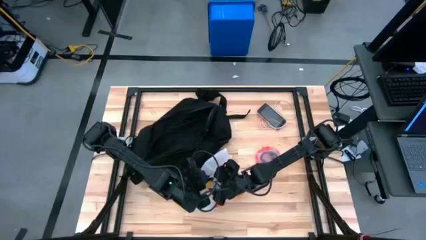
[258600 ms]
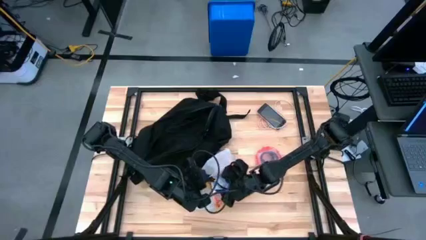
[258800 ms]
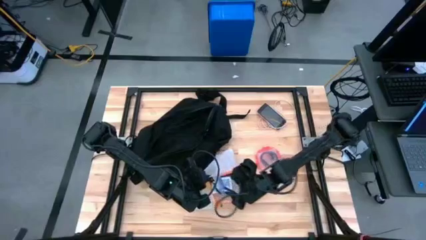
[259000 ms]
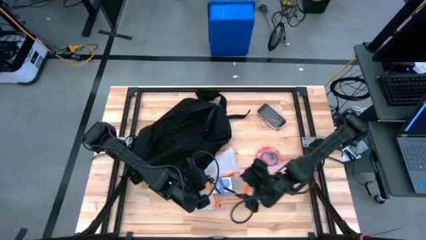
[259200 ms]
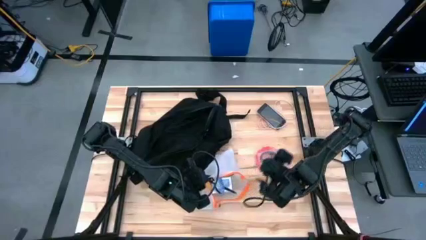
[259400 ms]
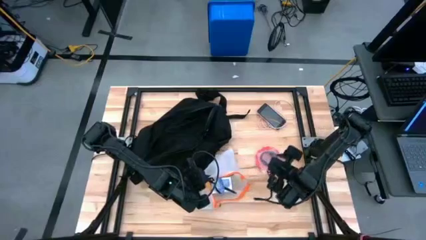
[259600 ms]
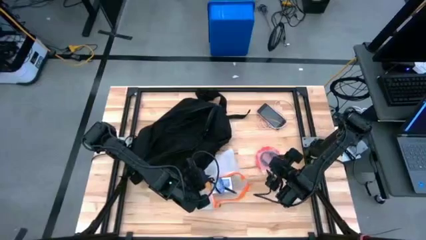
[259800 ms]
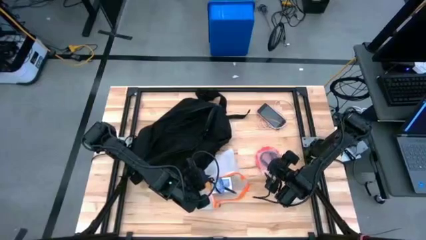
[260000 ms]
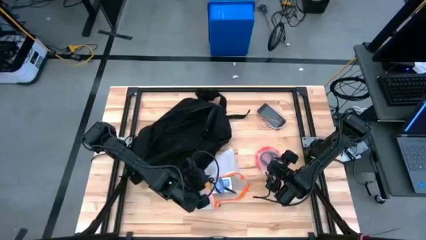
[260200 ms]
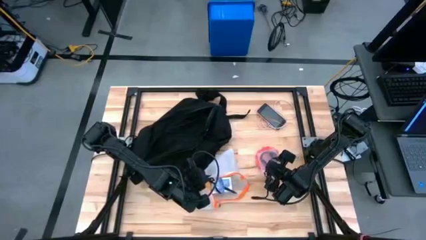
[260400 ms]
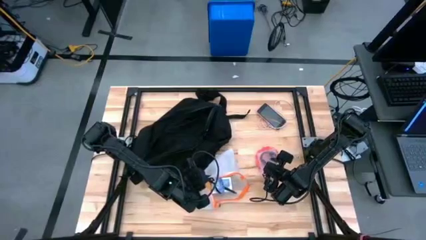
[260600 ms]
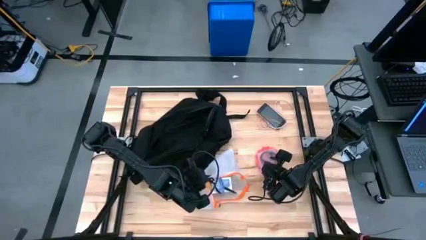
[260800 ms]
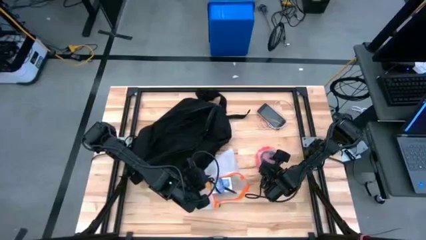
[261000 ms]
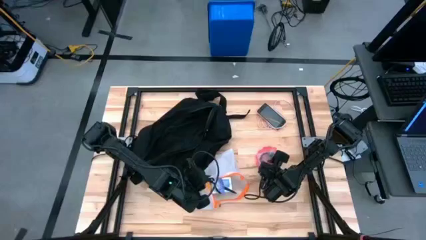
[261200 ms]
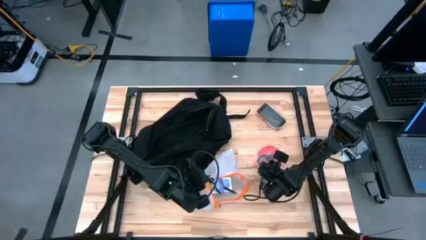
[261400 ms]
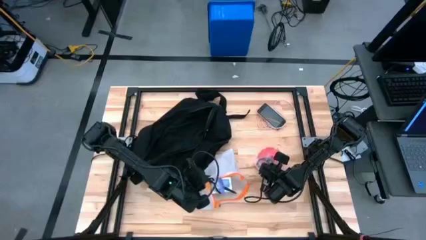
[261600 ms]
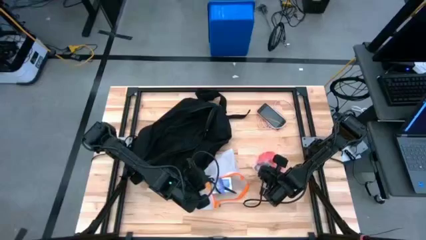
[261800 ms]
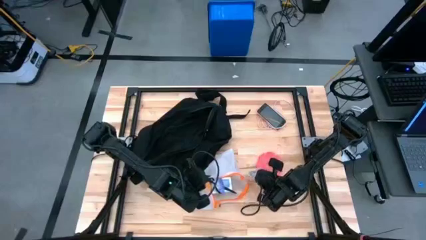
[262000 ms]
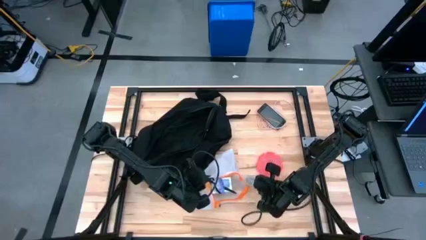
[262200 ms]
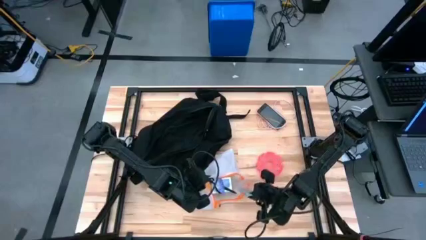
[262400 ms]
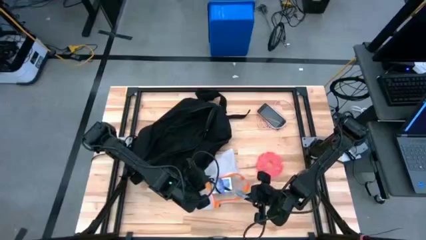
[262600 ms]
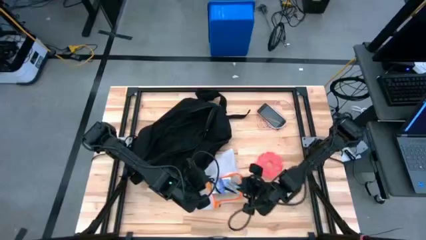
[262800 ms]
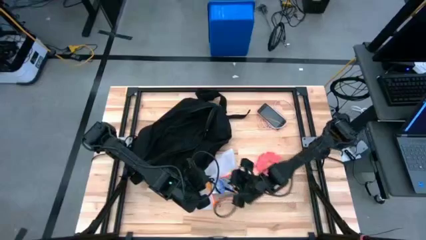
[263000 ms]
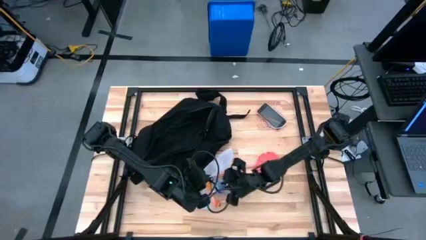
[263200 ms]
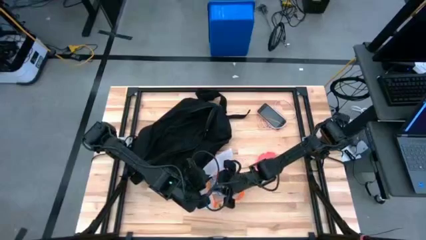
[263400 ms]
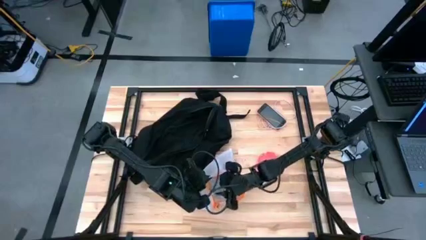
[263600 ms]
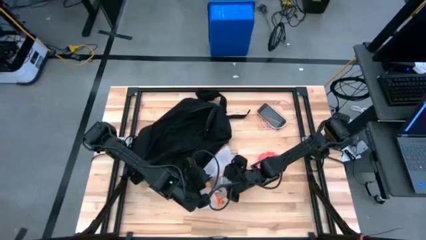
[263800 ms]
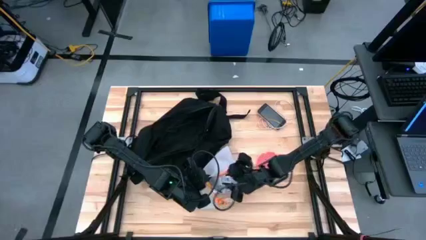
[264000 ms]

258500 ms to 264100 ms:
Task: Unpack backpack
Put the black earphone into the orange zip bag

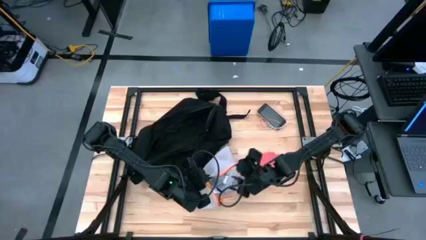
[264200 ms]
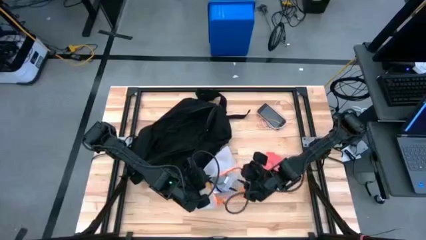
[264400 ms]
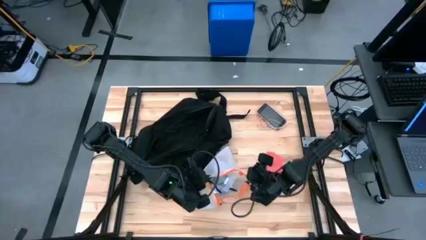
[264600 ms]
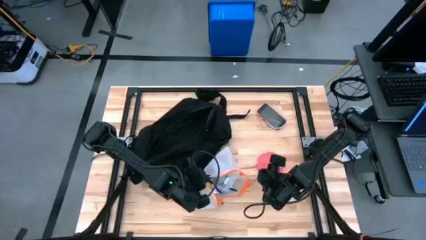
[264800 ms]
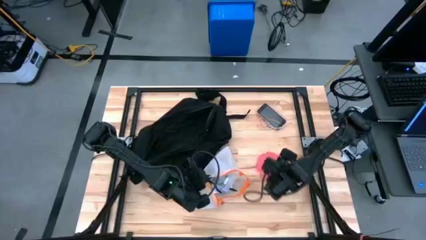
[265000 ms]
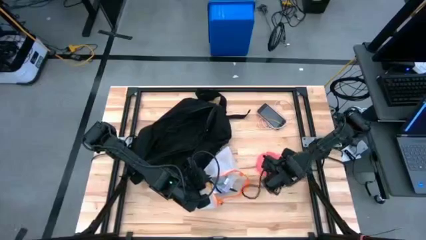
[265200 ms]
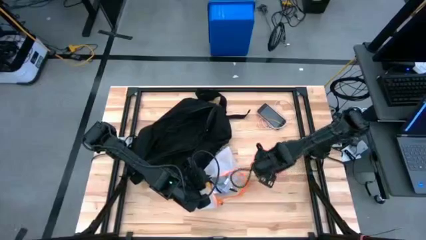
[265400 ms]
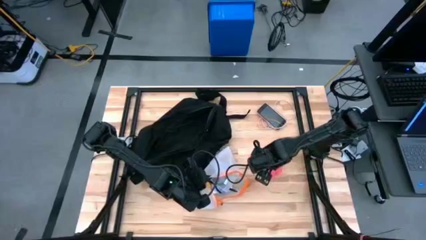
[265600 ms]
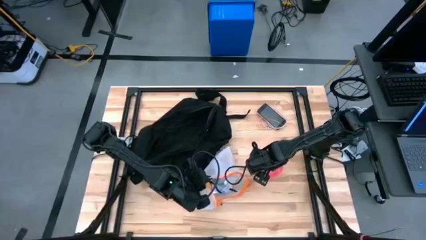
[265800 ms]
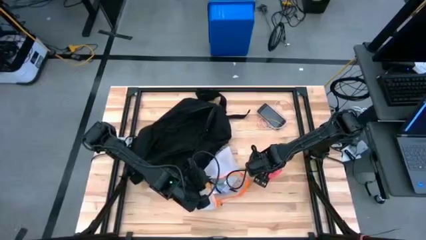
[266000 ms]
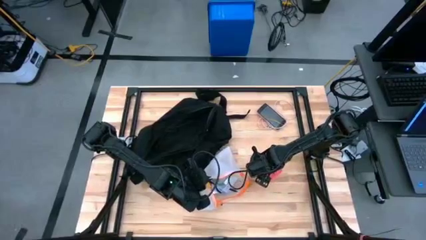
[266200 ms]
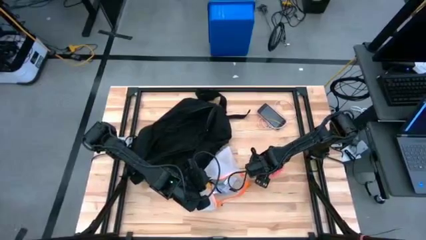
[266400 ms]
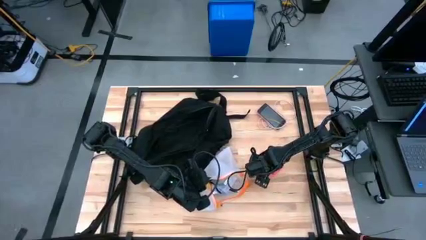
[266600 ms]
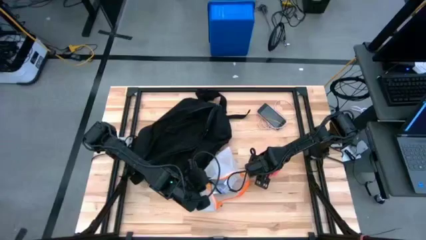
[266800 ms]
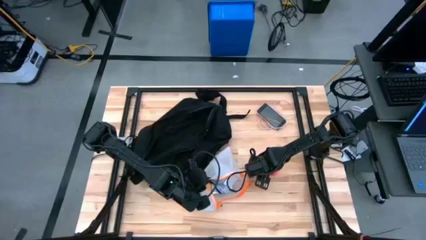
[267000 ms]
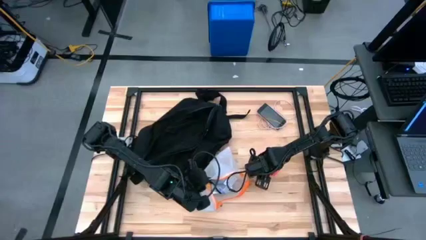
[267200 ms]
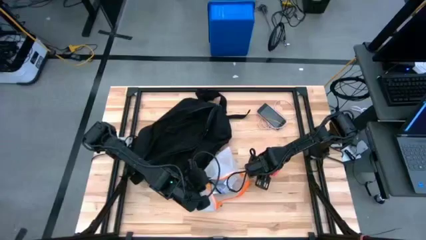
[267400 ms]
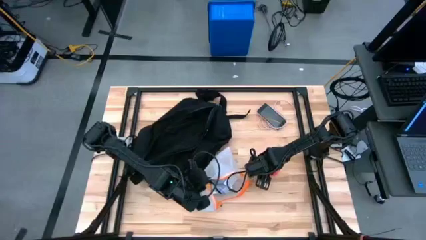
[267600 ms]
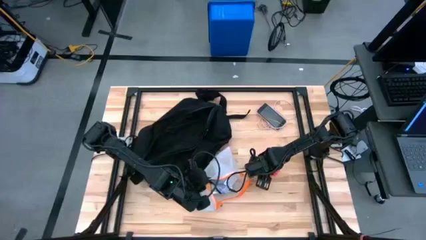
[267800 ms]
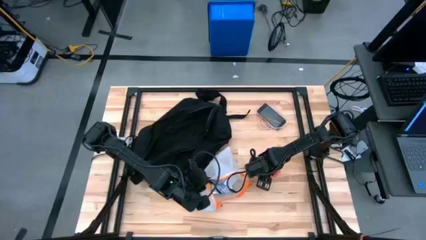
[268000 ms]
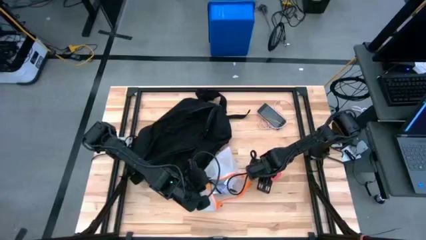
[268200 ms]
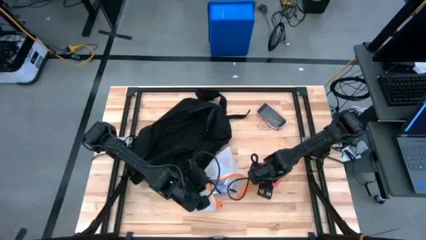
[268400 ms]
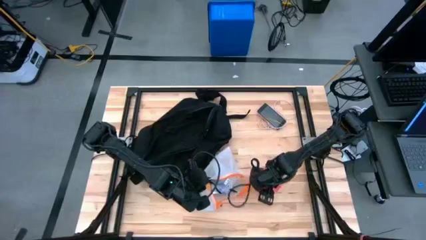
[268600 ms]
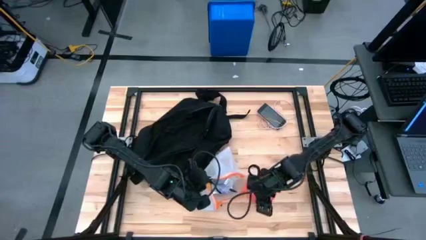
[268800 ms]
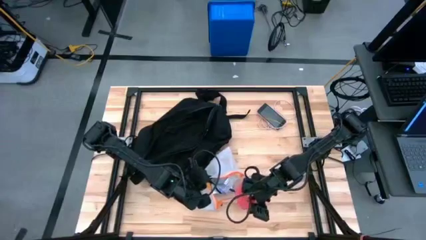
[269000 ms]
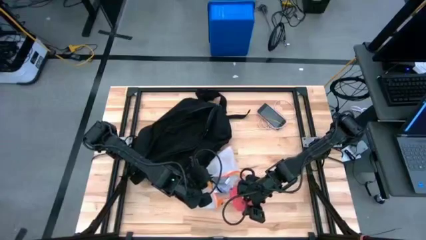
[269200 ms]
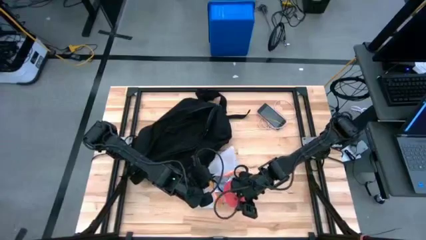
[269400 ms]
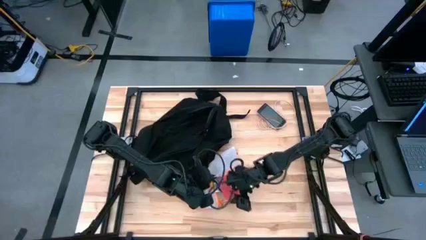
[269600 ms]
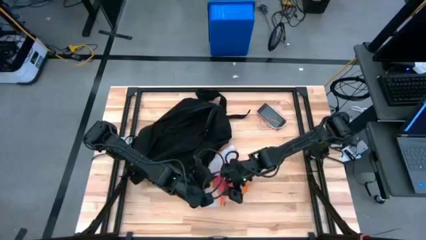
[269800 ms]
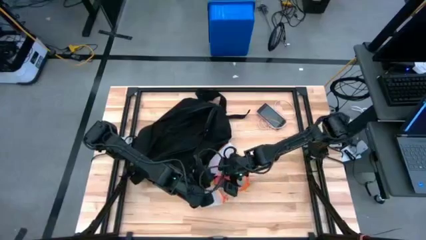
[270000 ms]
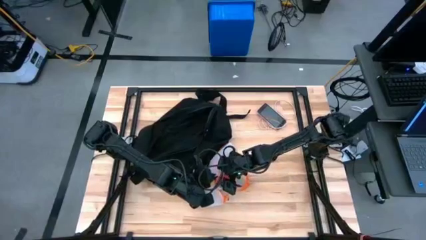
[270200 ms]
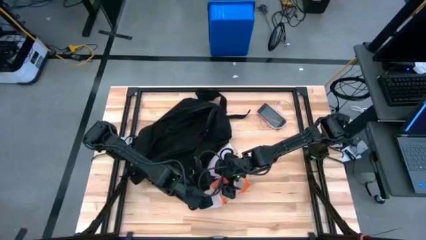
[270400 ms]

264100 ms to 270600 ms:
Put the pink medicine organizer into the orange zip bag

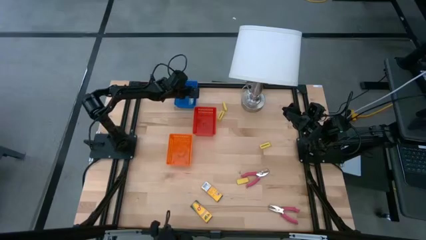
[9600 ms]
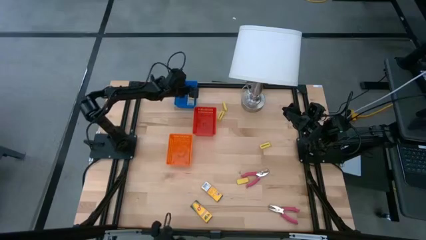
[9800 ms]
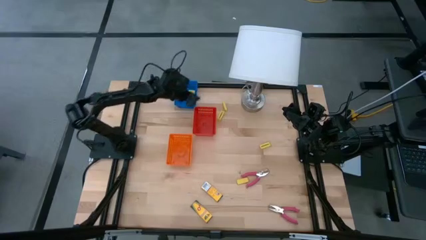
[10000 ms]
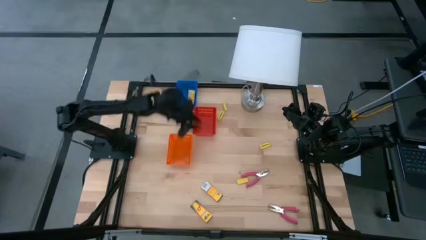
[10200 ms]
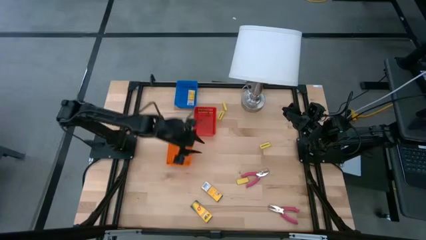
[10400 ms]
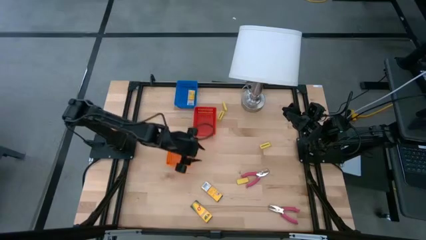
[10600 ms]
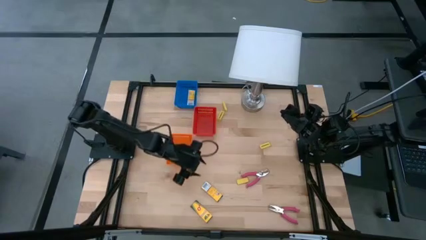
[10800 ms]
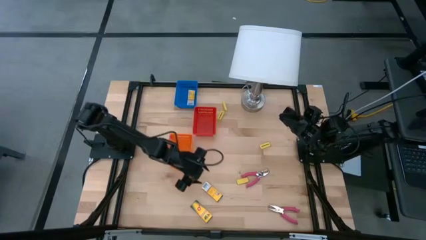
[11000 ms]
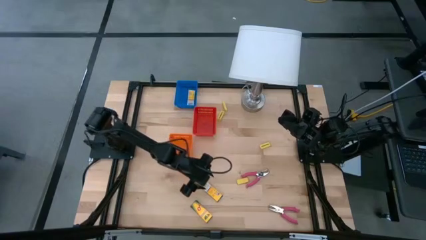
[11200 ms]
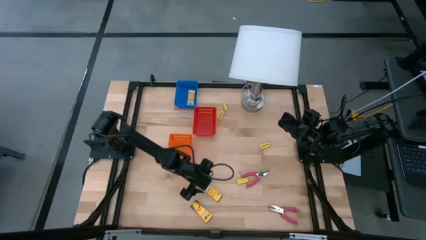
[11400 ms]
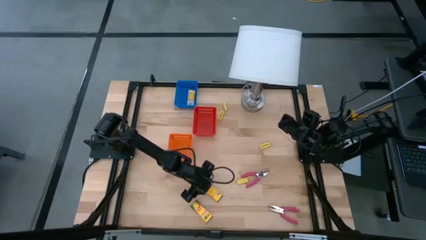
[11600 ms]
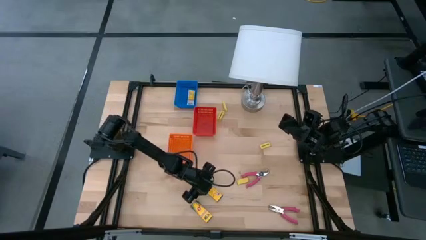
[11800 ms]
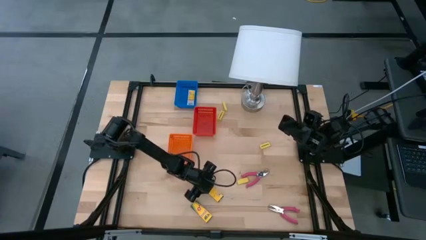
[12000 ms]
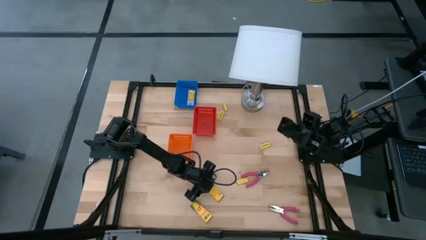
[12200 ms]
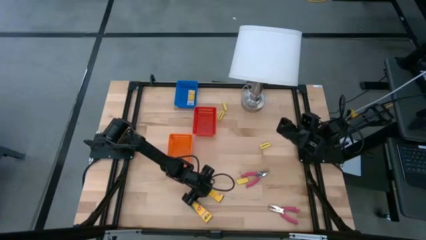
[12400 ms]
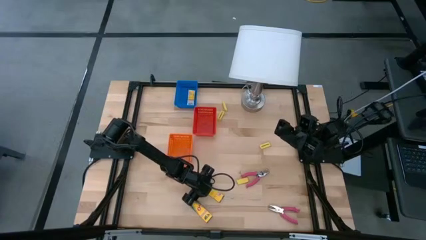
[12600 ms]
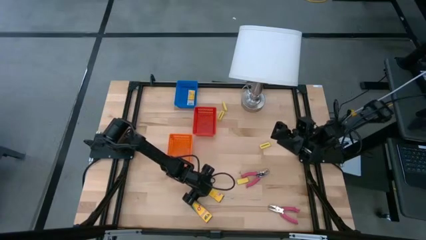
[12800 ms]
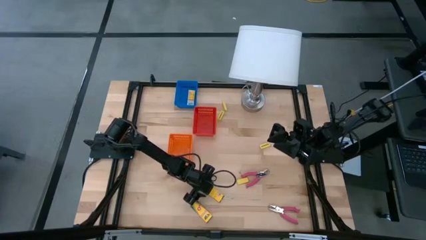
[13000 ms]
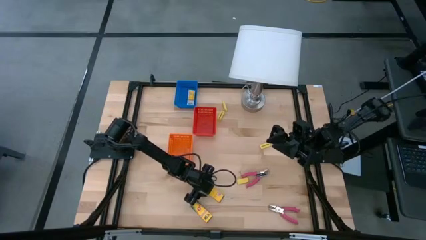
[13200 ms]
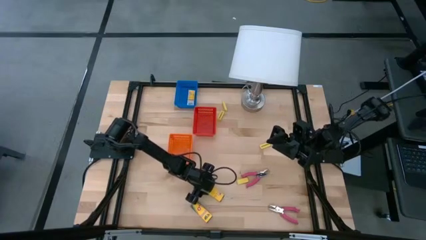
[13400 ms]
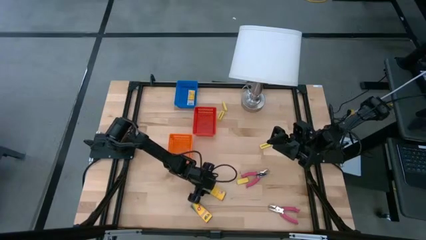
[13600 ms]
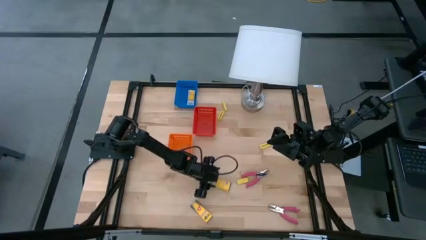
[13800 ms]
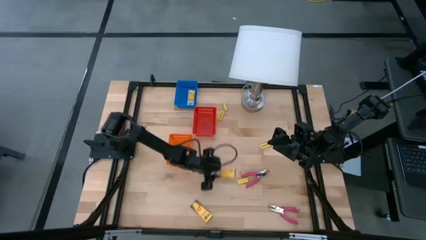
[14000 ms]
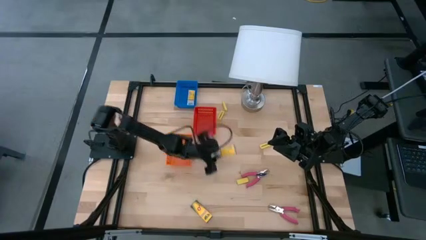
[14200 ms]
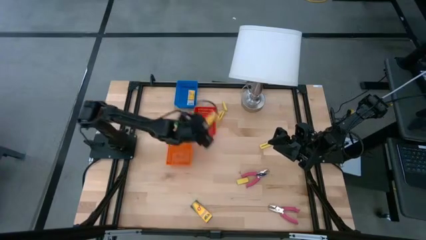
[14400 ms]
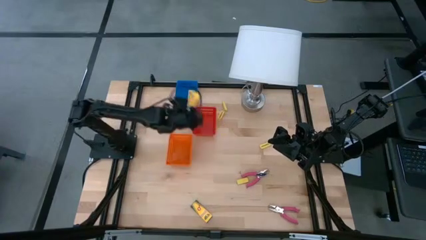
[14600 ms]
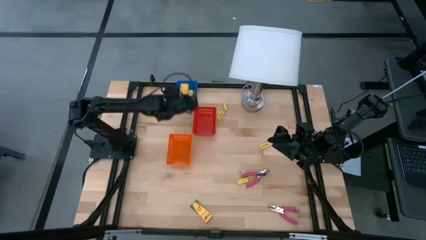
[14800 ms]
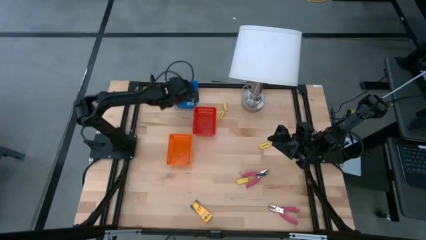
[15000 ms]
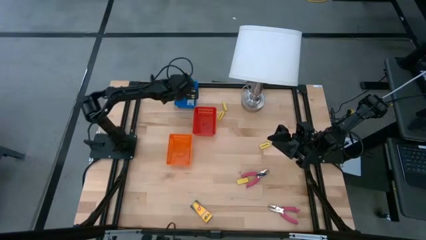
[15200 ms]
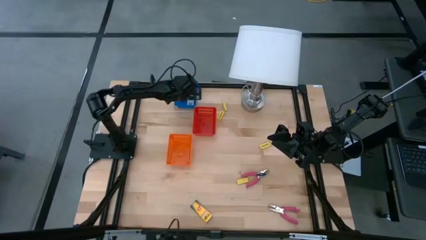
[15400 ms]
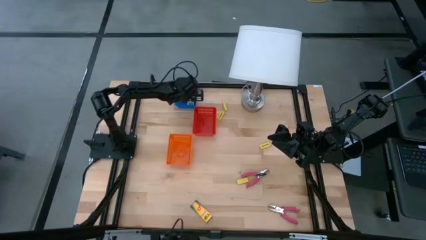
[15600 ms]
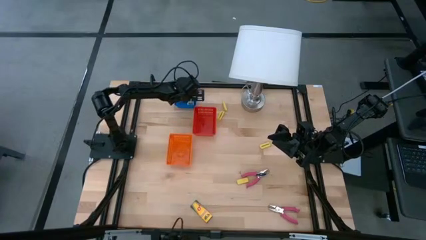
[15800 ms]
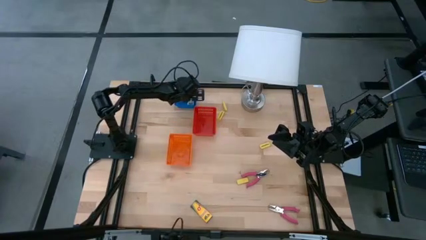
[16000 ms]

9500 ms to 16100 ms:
Task: Pick & Place School Supplies
Put the yellow crayon box into the blue bin
